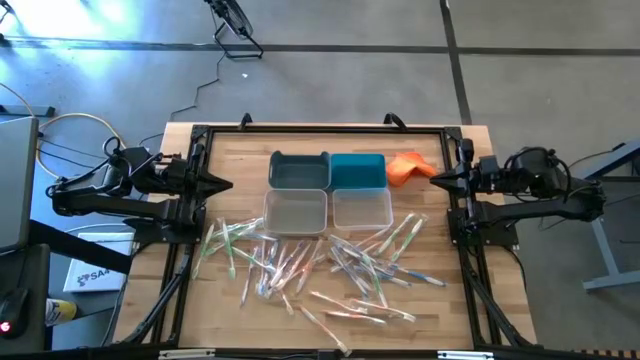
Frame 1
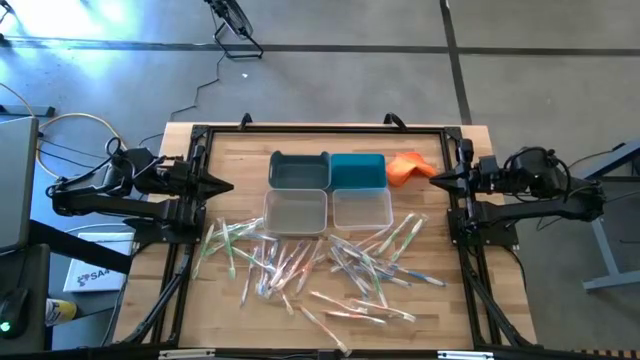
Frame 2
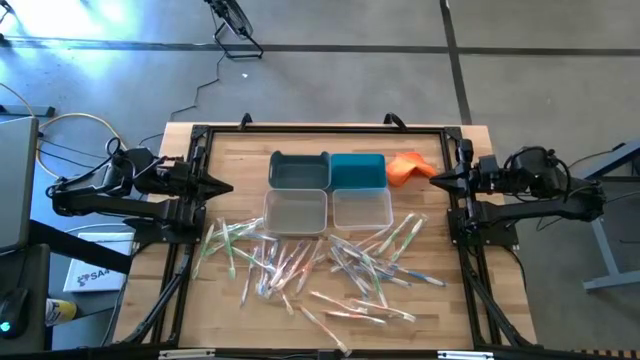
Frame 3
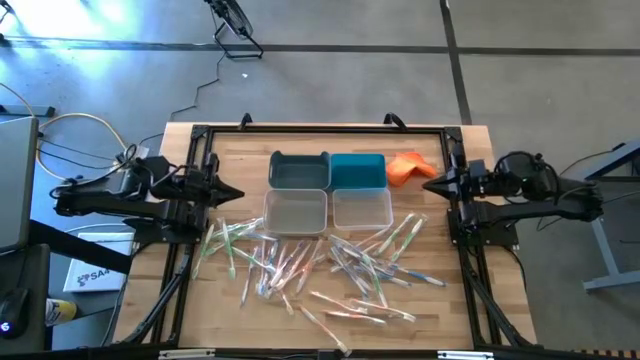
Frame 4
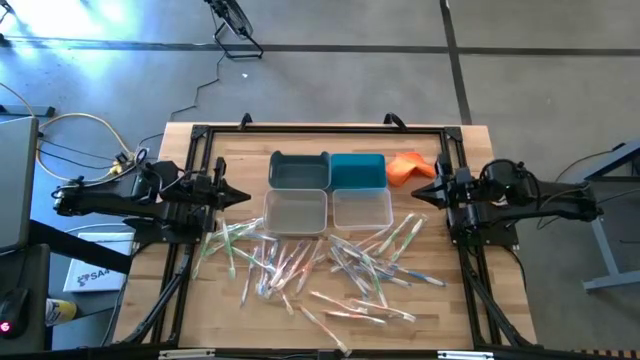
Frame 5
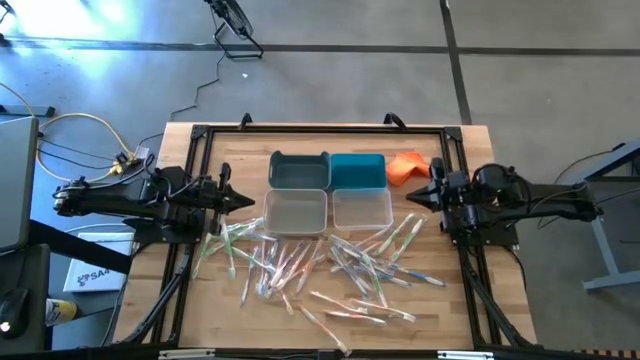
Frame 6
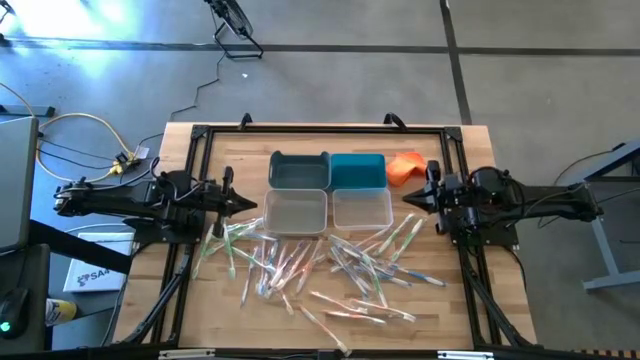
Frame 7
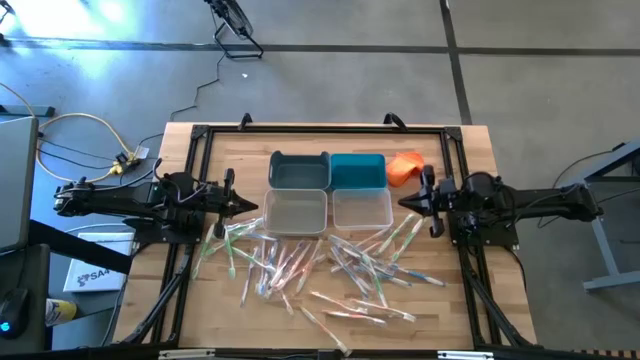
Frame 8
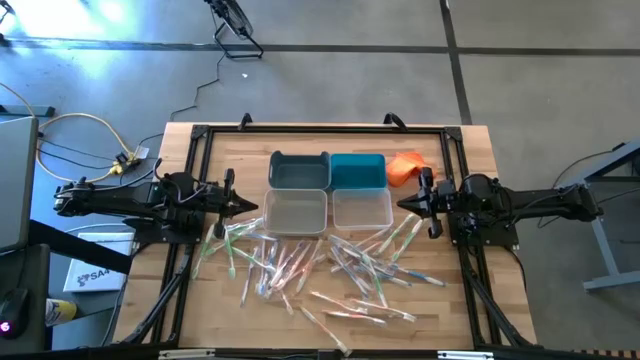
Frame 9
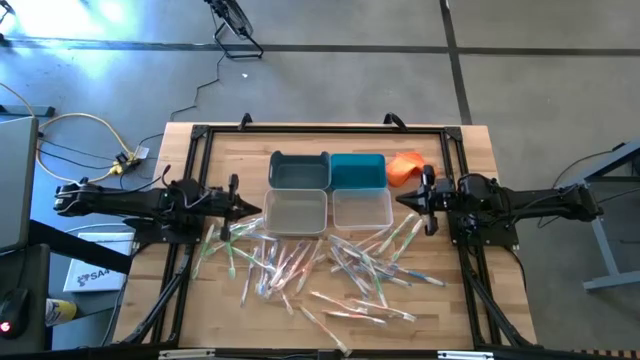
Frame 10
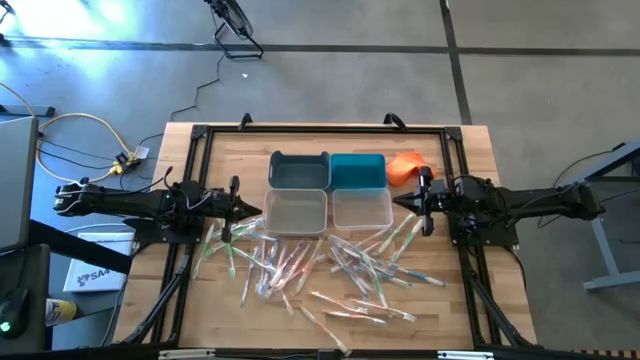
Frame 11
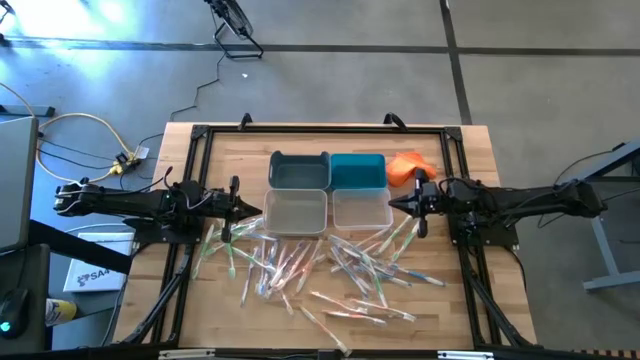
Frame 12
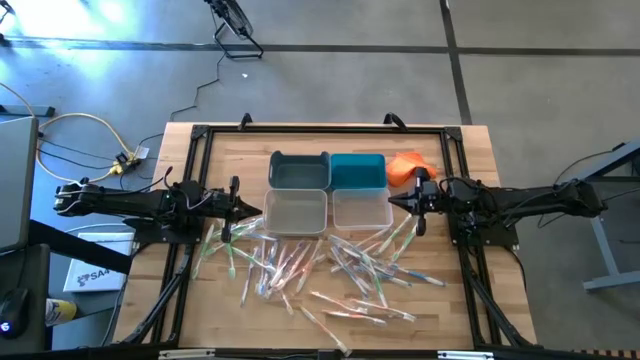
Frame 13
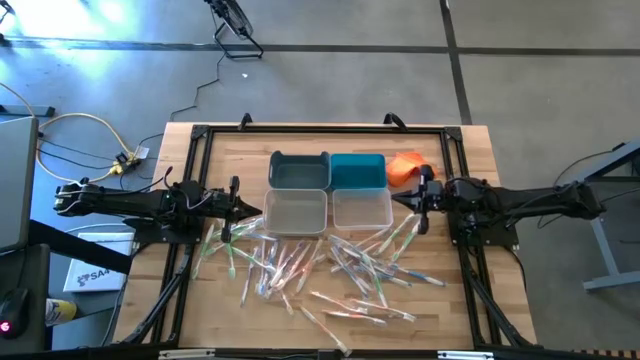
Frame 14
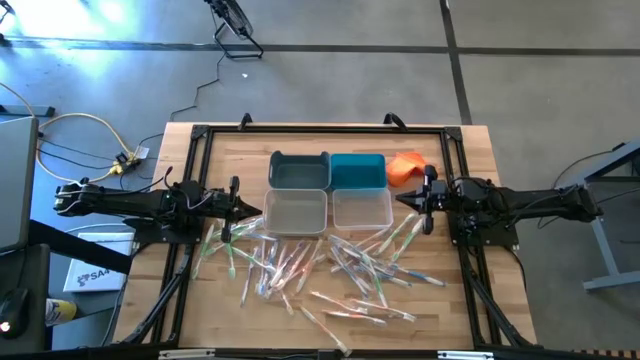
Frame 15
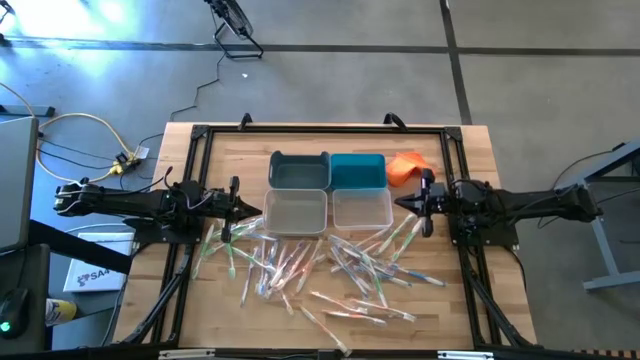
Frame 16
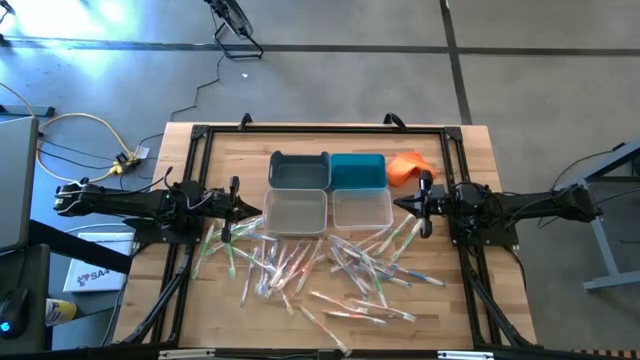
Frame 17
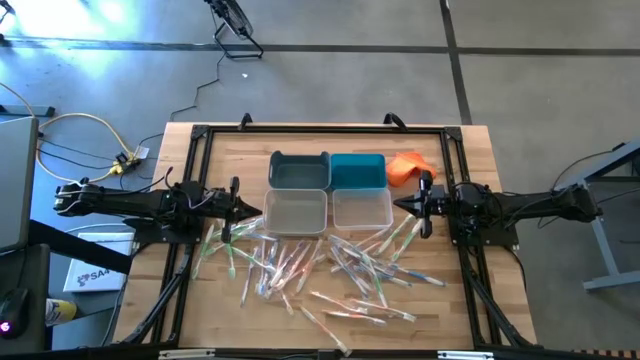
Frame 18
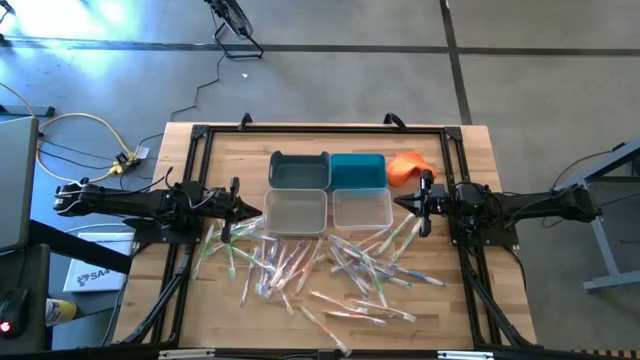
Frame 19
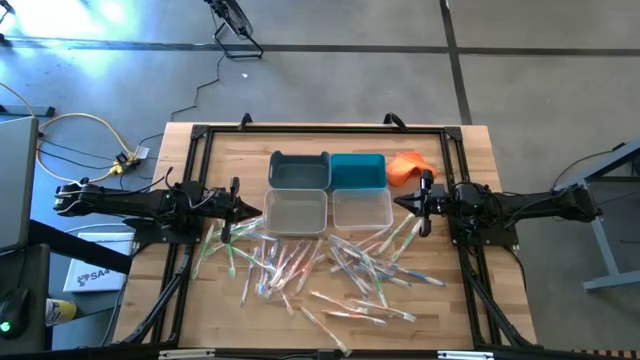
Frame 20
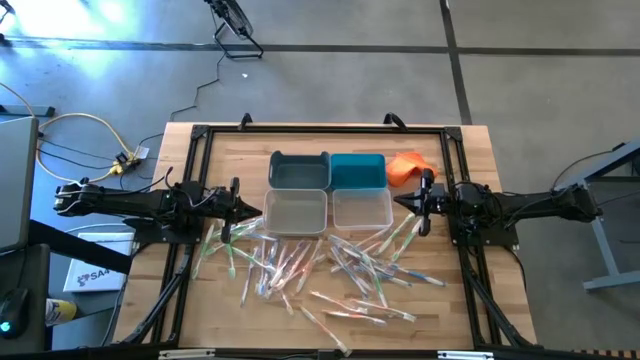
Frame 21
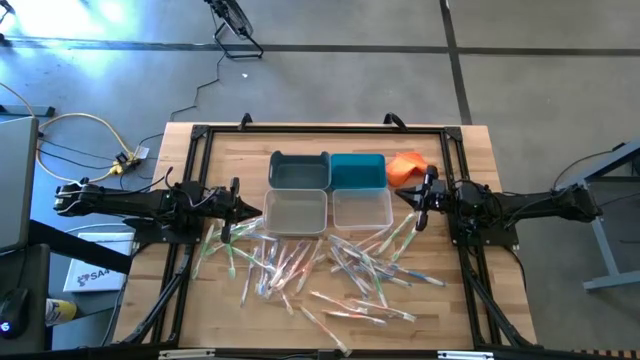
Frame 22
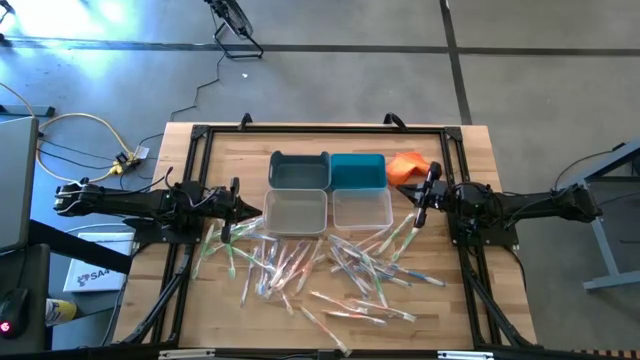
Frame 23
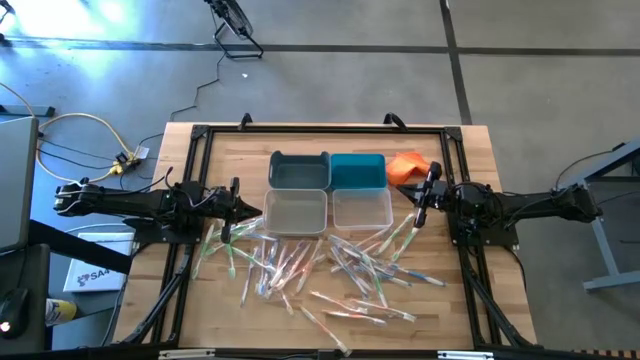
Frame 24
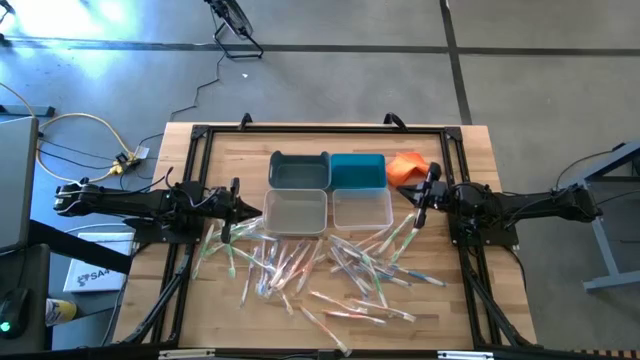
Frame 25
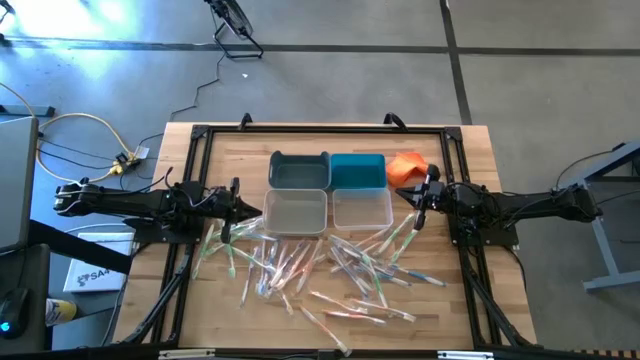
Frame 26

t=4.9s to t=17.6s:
Task: Pick & Place Toothbrushes
Put the green toothbrush into the blue bin

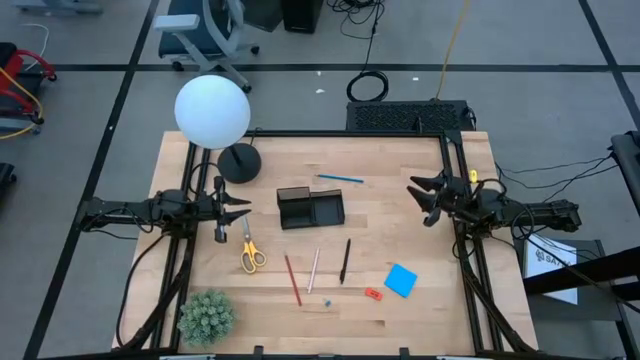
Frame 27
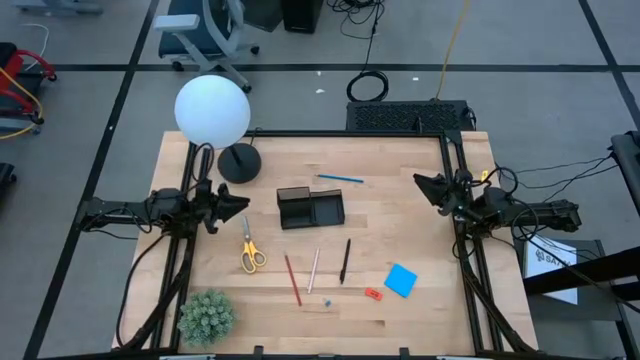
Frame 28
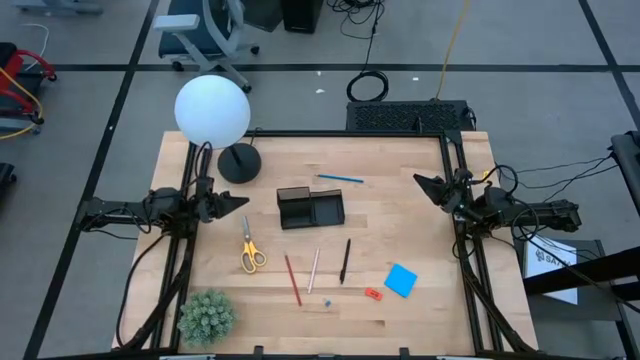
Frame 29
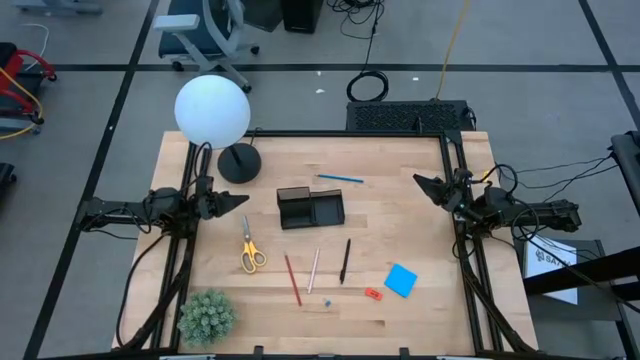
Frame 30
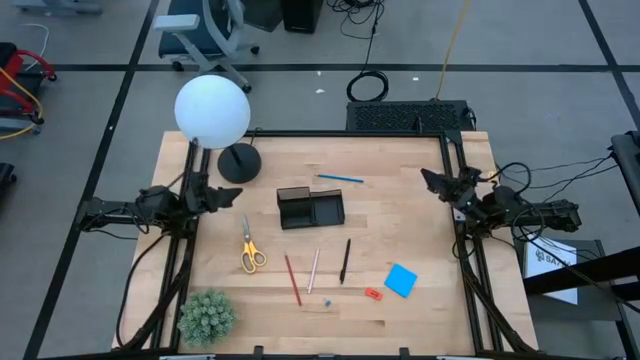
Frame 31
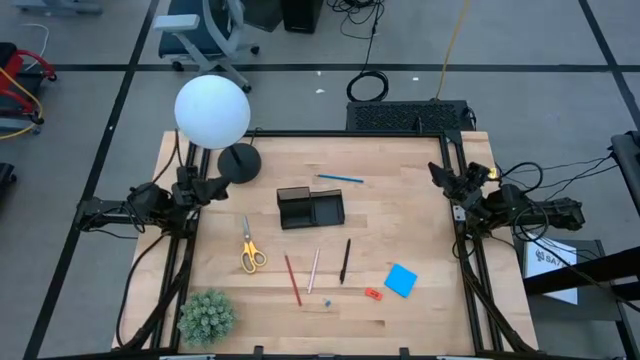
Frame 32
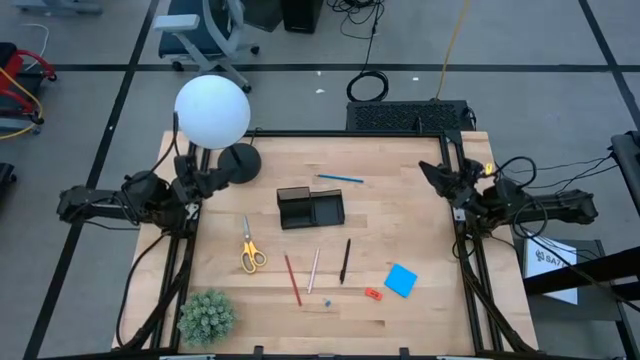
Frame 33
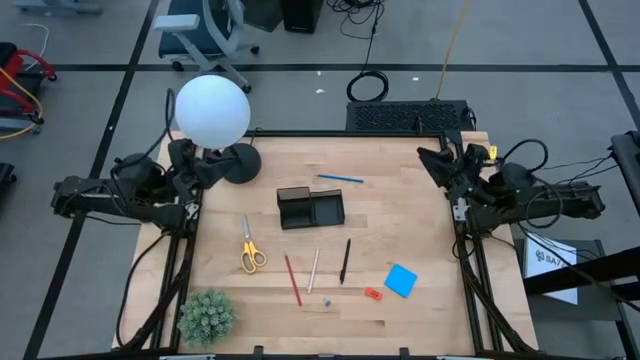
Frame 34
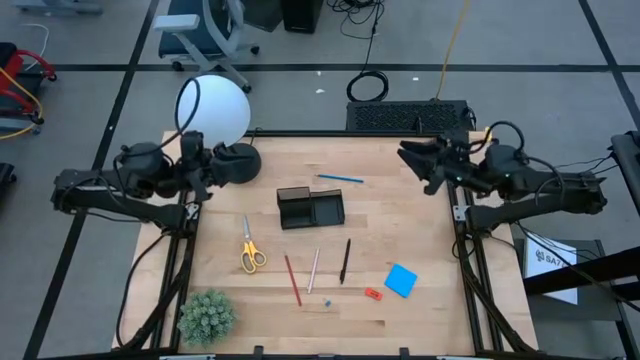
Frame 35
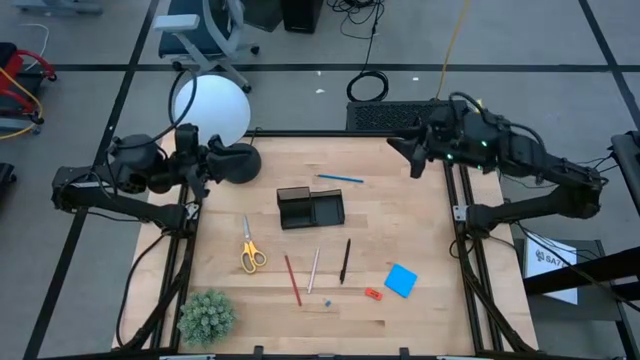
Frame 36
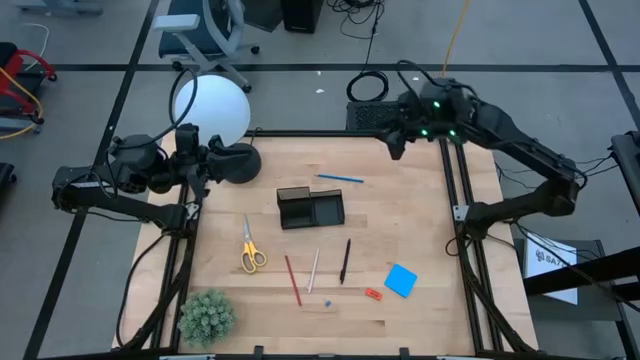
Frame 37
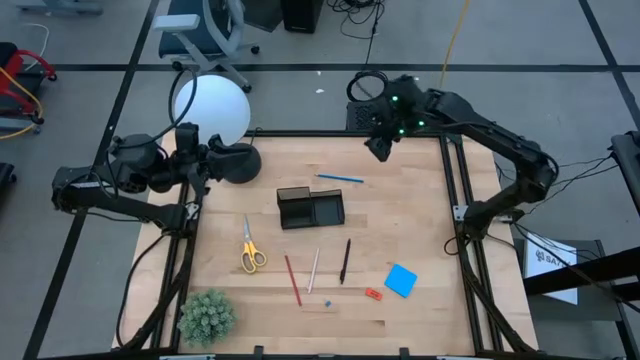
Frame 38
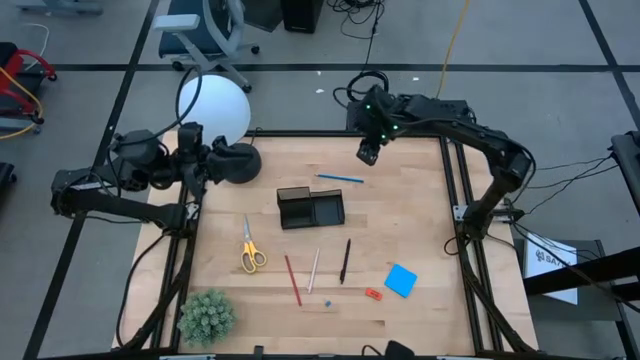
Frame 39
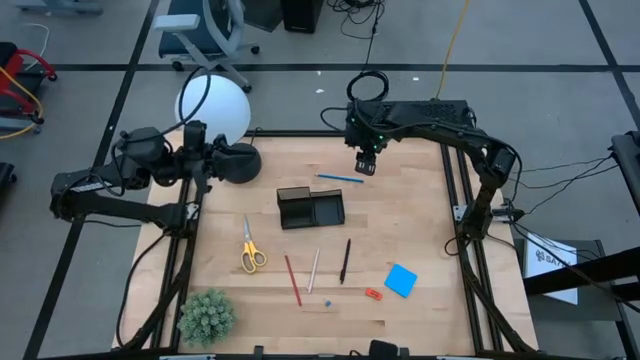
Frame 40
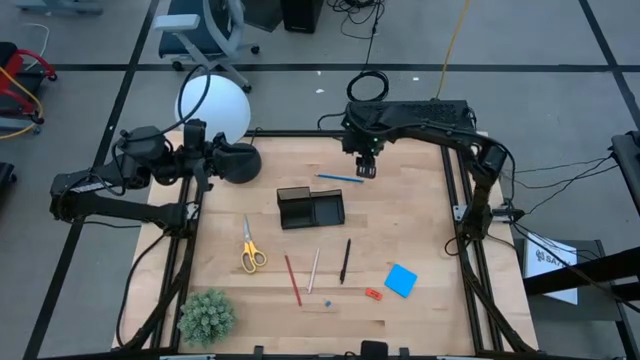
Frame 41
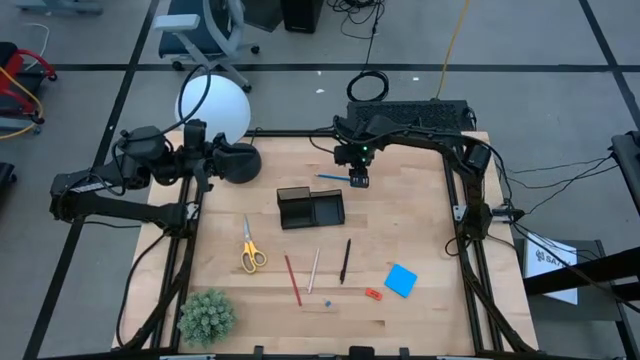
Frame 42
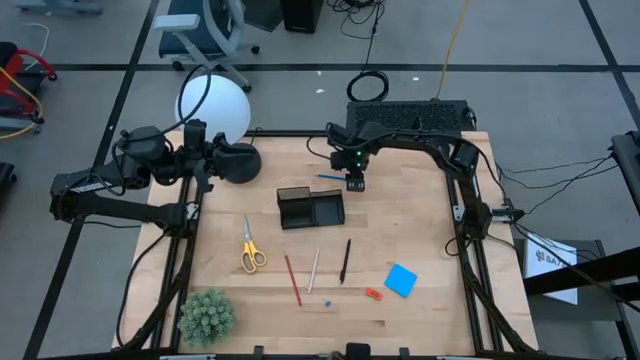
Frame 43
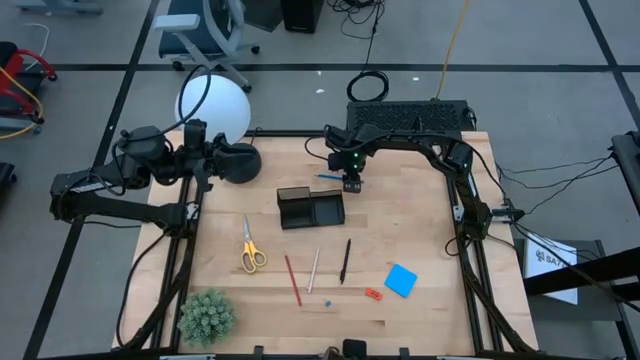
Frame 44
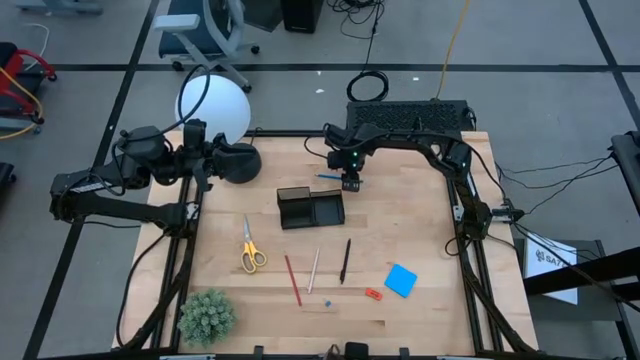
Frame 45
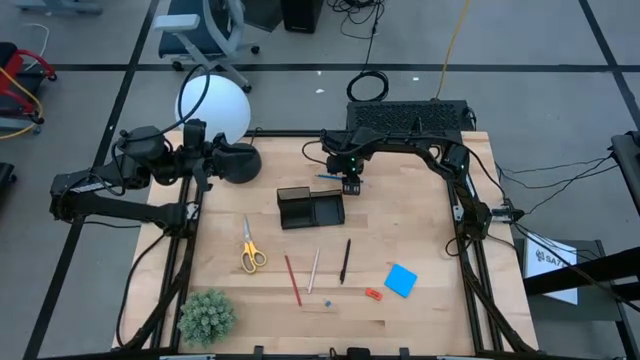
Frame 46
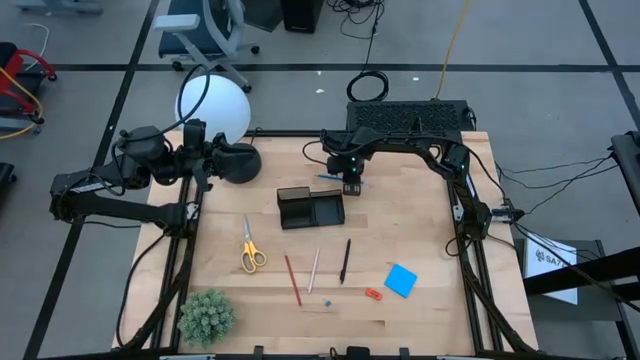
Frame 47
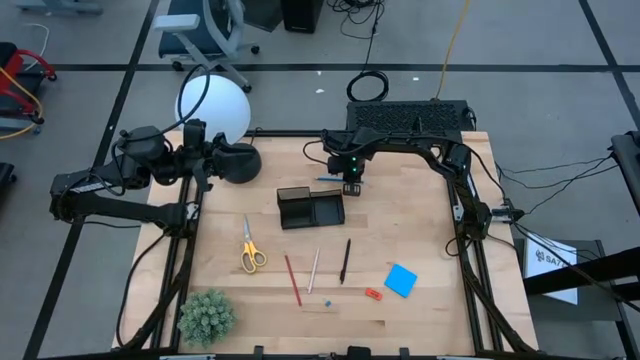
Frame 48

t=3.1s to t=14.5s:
Task: Pick and place office supplies into organizer
Put the blue pencil into the black organizer
